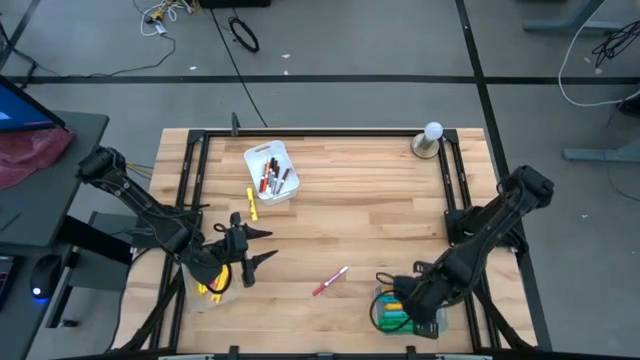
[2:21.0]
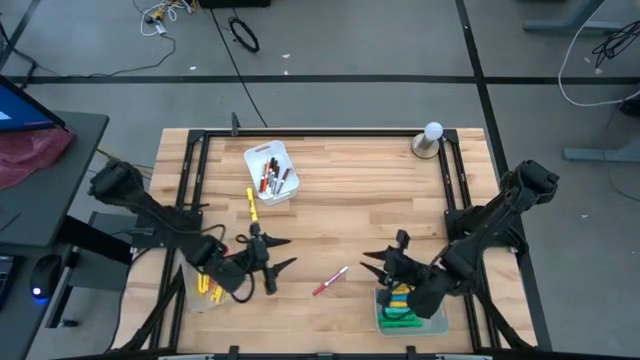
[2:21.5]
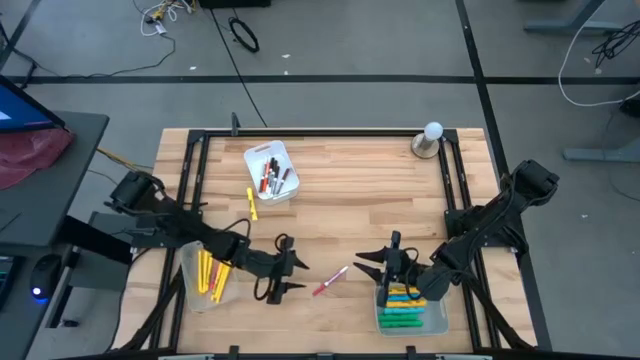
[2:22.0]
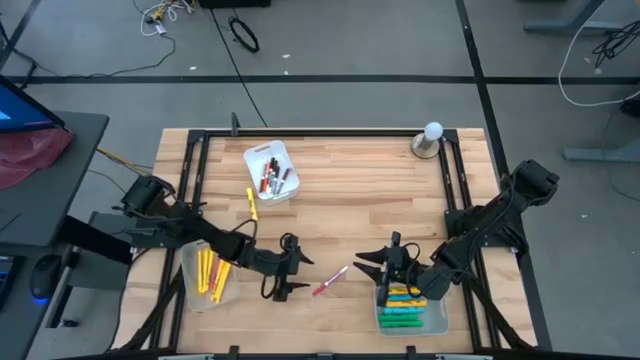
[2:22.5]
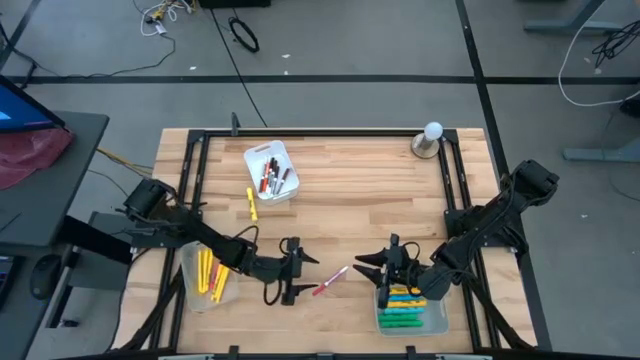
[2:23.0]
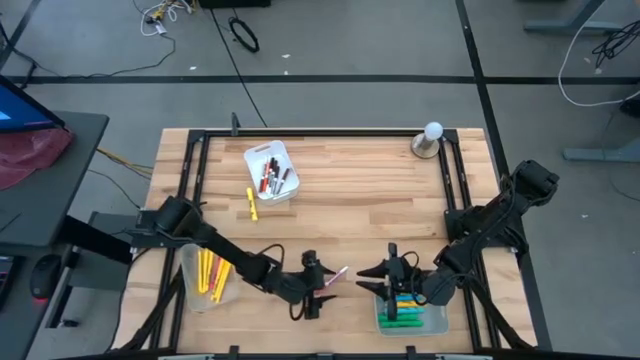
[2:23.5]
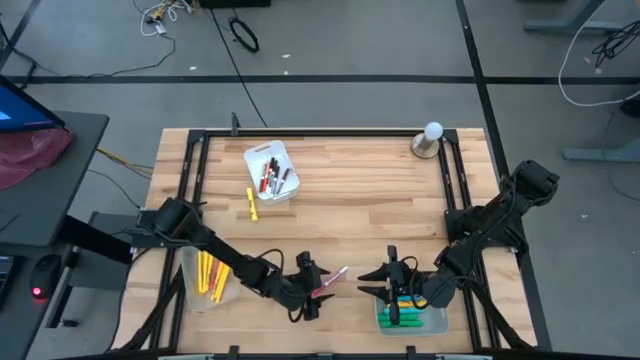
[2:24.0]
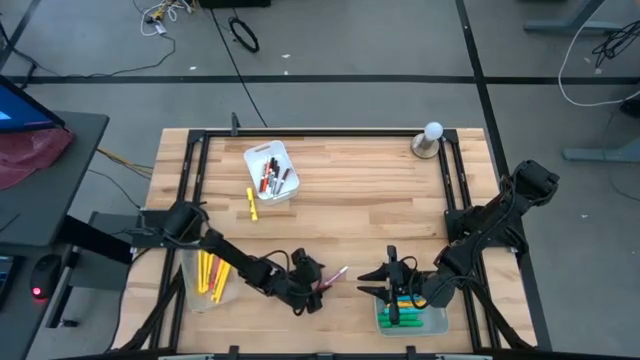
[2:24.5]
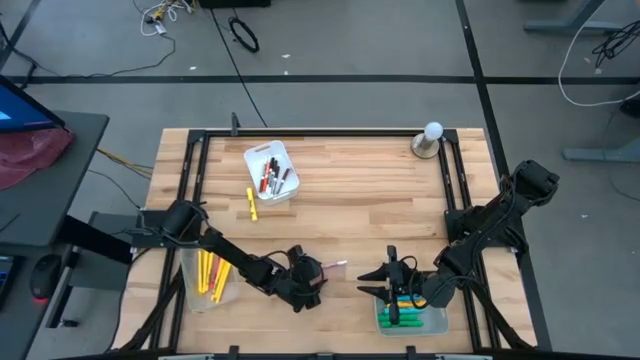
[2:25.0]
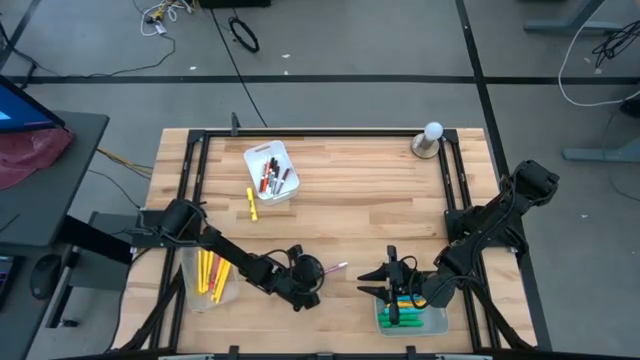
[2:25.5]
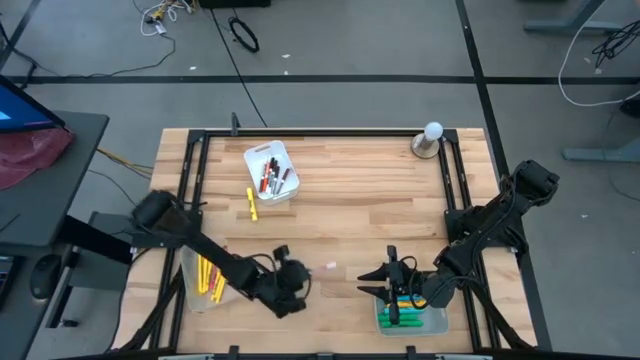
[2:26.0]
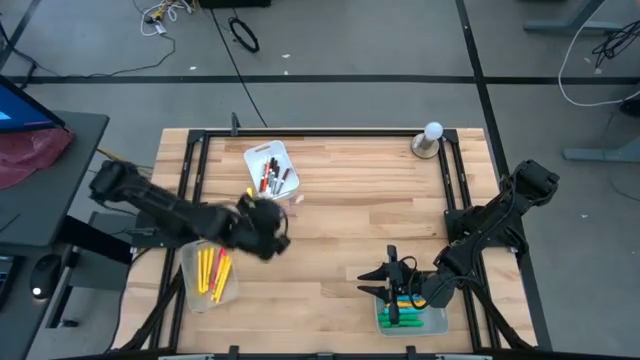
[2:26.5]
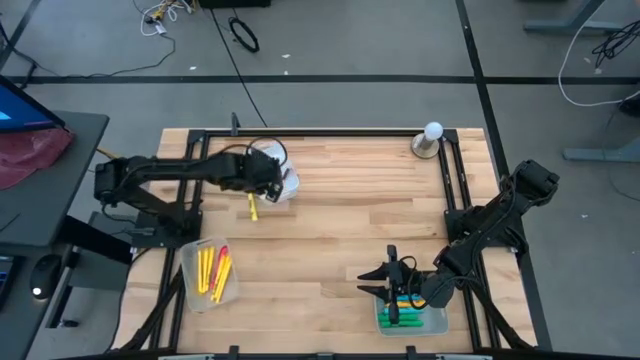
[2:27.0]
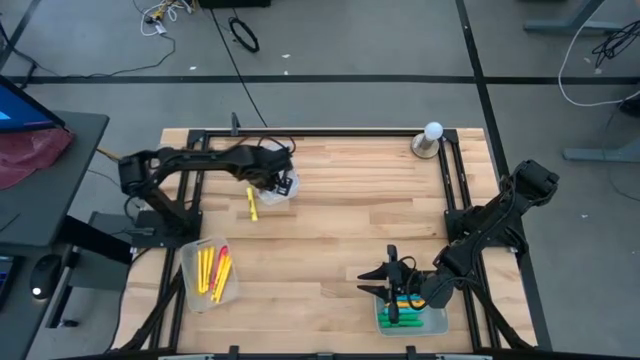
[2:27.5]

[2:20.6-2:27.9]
Task: Pick & Place Markers
Put the pink marker pen into the white bin

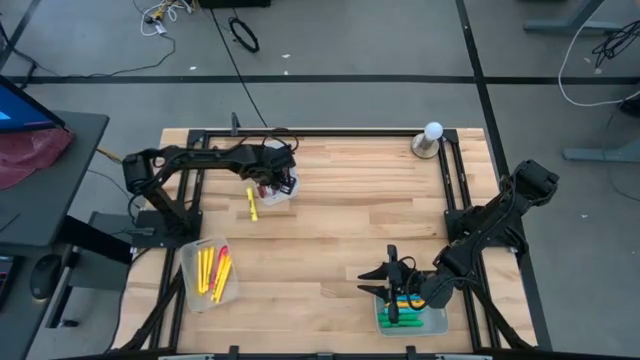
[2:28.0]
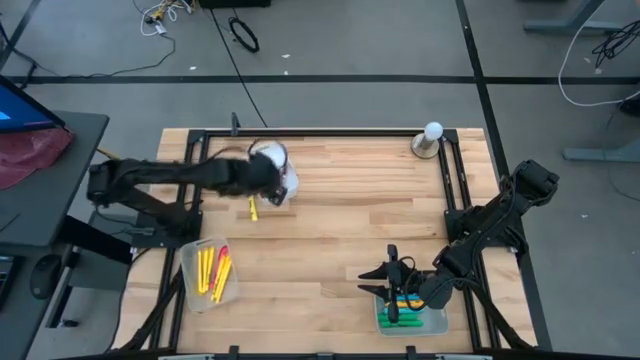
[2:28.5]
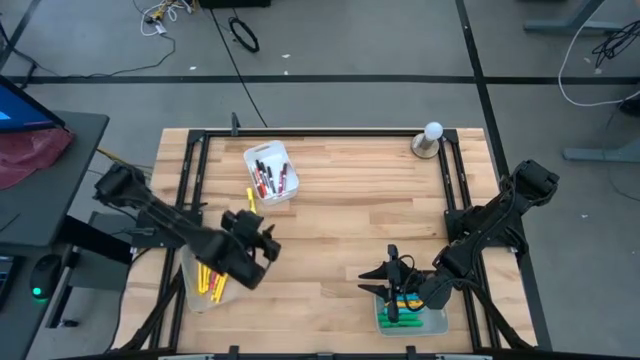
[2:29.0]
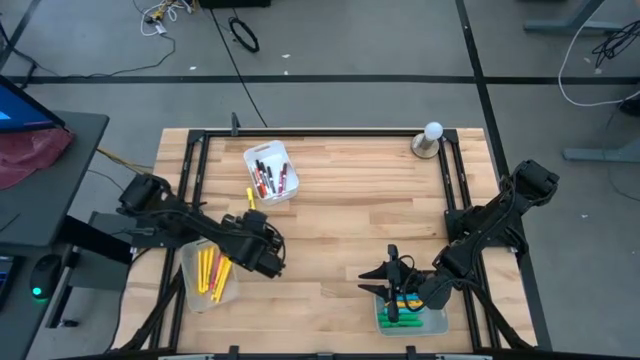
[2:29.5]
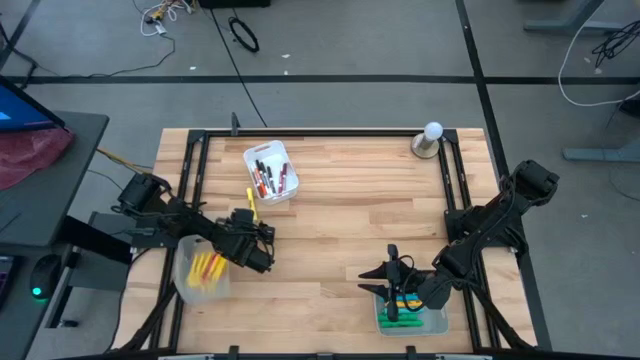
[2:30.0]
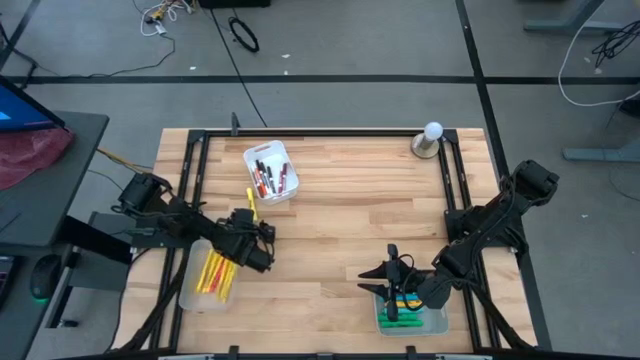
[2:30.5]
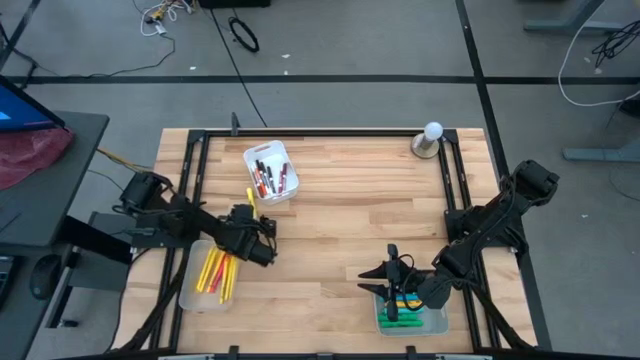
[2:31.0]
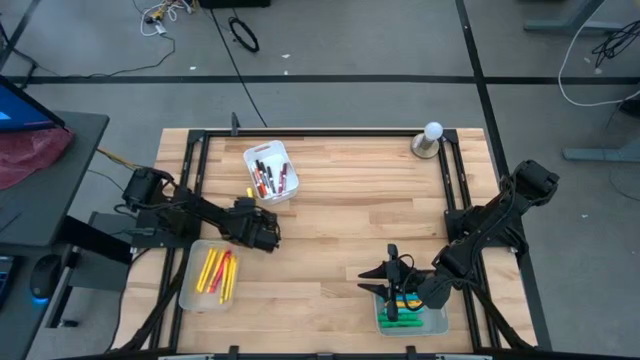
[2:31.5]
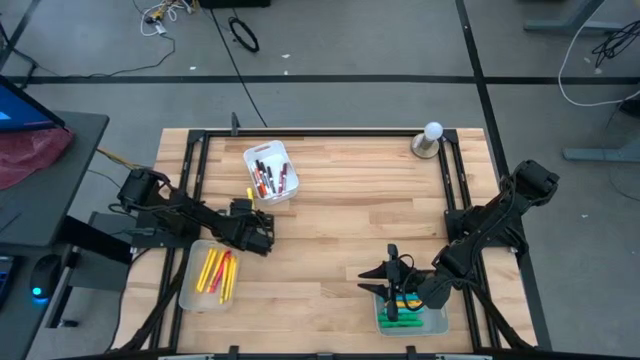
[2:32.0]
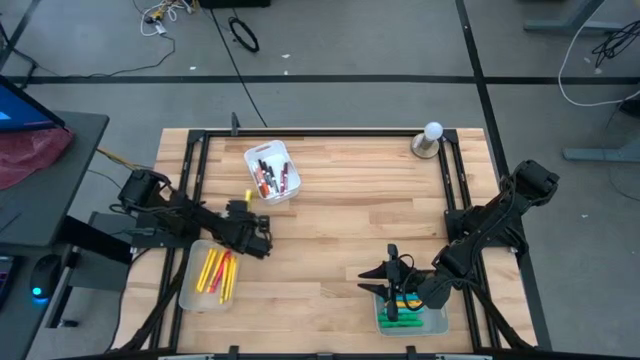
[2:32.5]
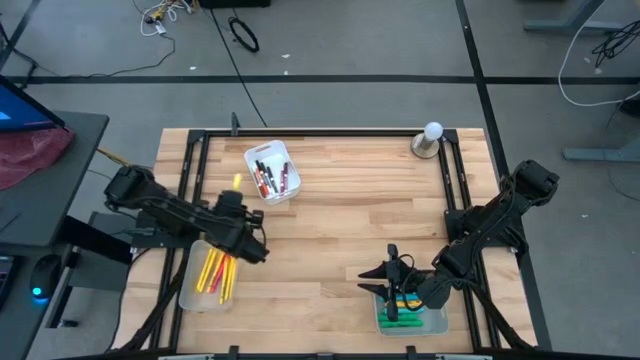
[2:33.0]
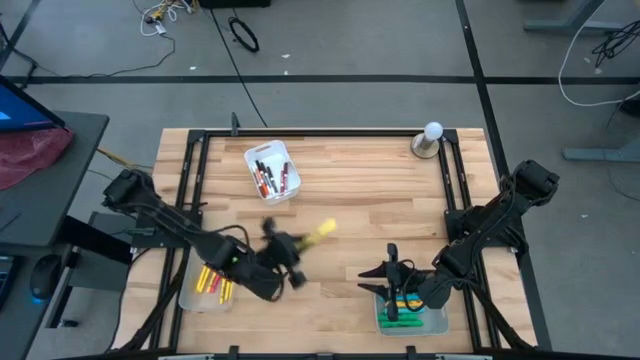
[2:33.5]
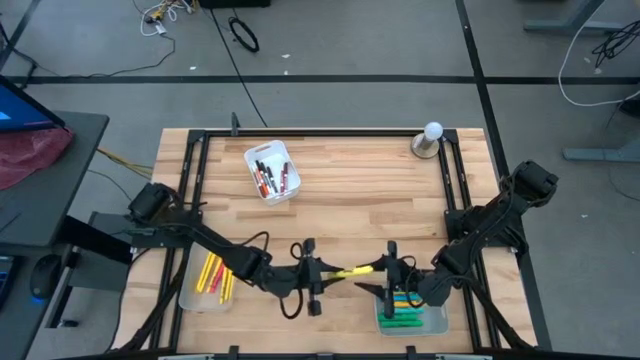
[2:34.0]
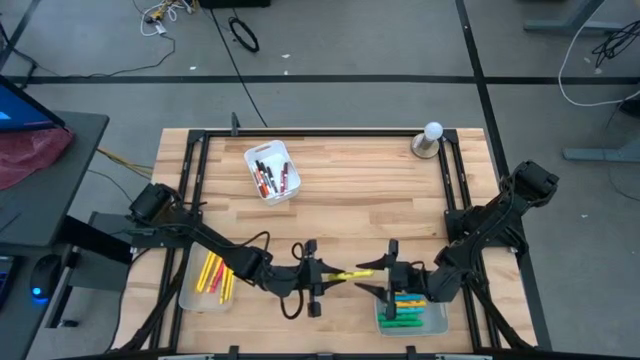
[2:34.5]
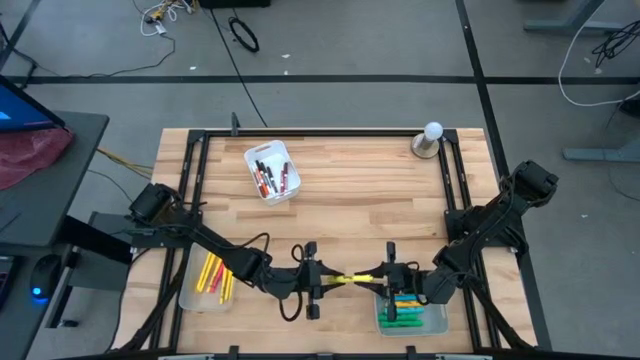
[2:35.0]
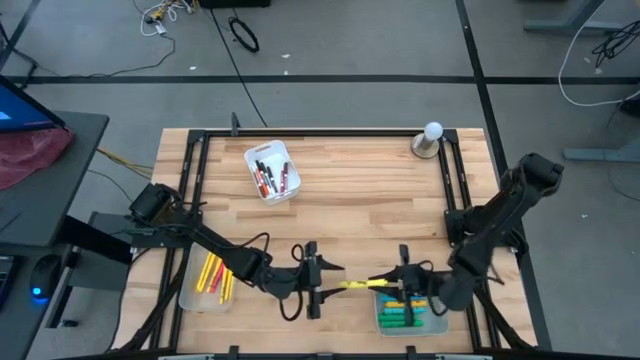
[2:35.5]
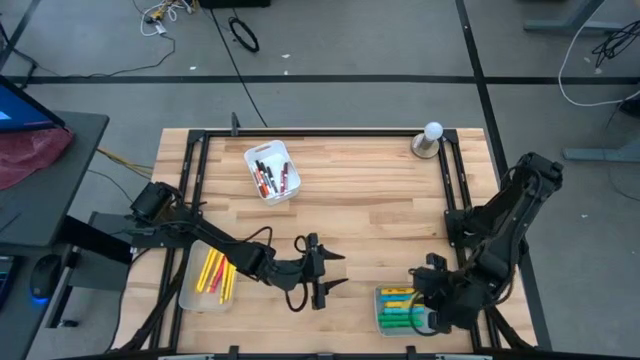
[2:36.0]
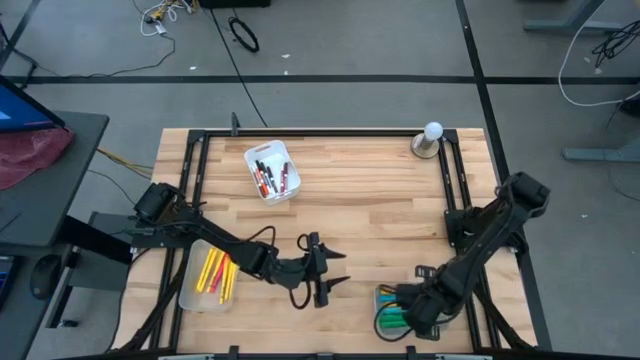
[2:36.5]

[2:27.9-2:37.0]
Put the yellow highlighter into the gray bin

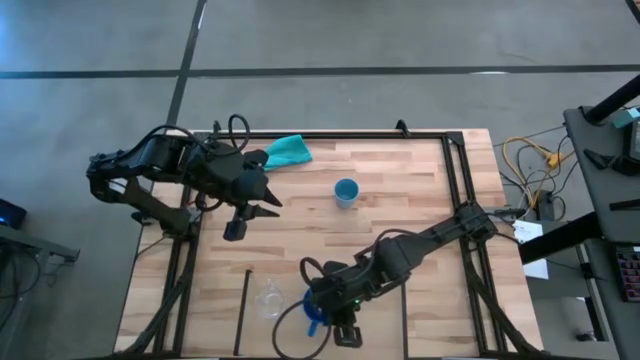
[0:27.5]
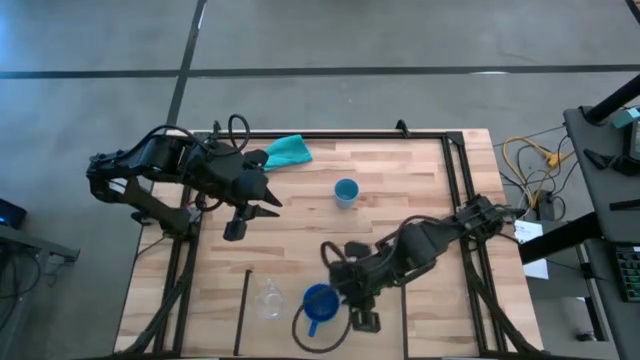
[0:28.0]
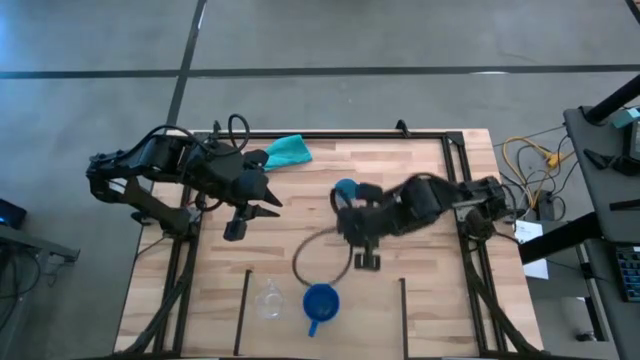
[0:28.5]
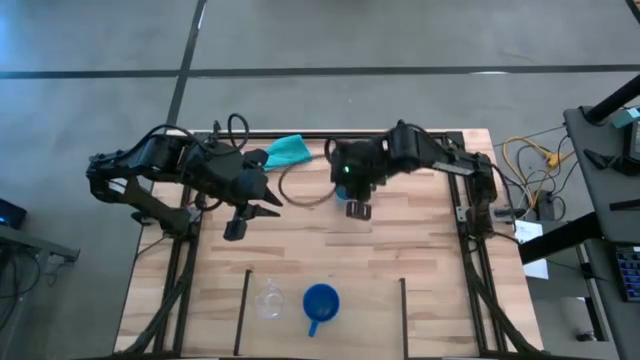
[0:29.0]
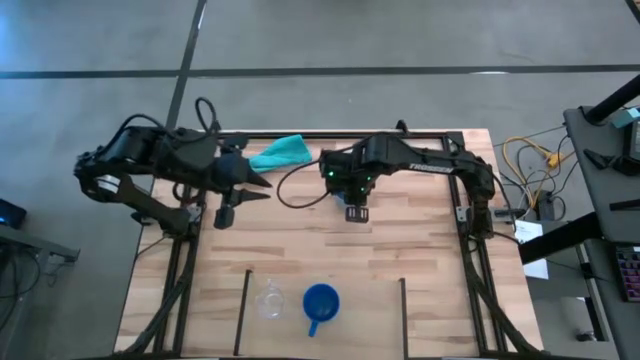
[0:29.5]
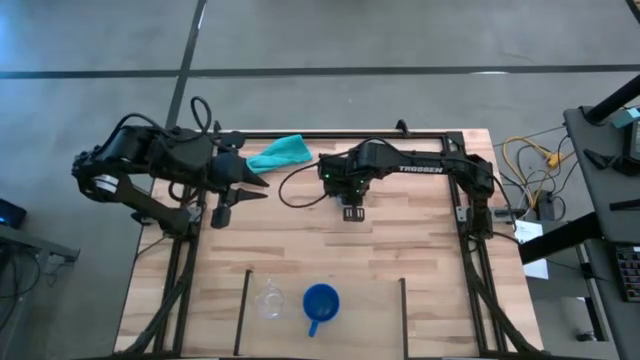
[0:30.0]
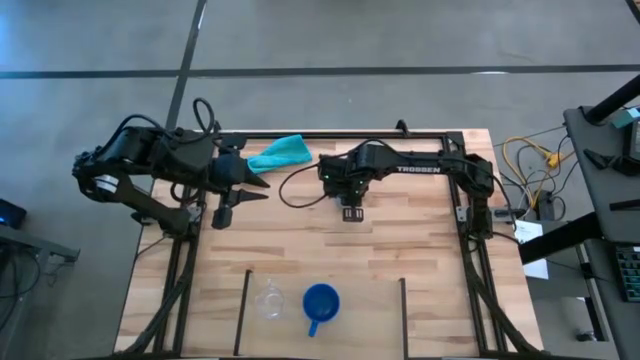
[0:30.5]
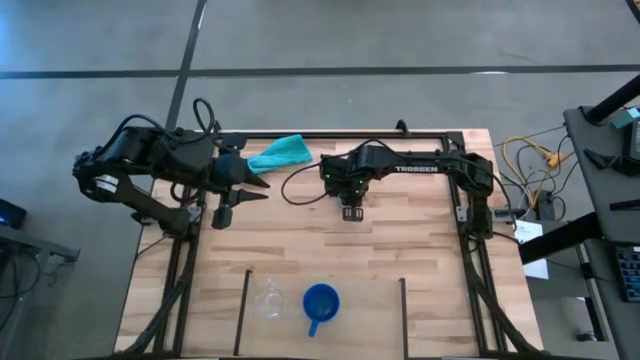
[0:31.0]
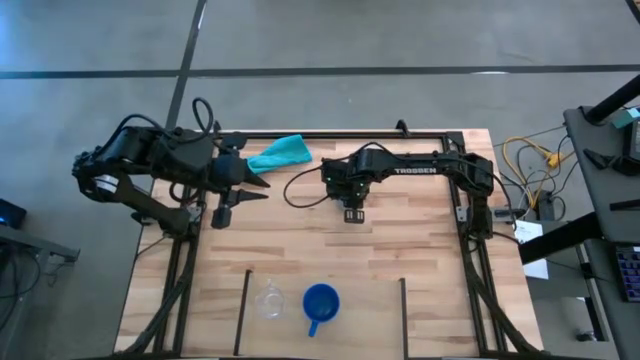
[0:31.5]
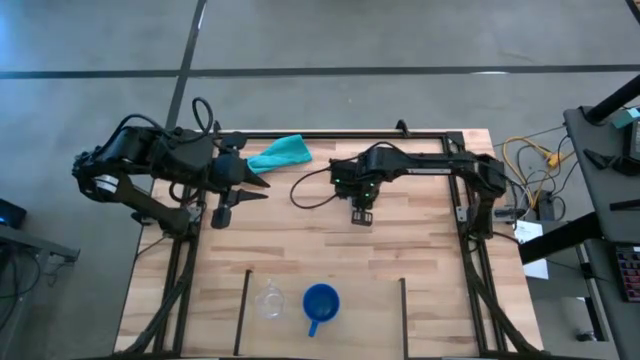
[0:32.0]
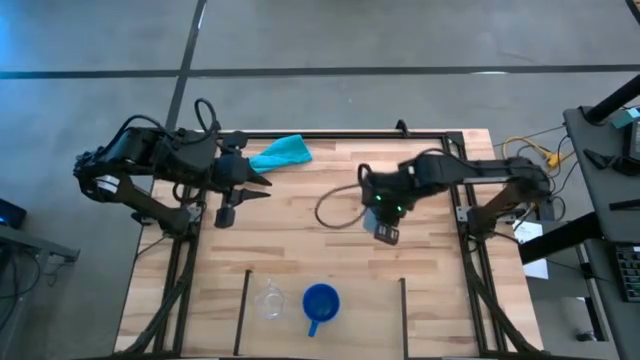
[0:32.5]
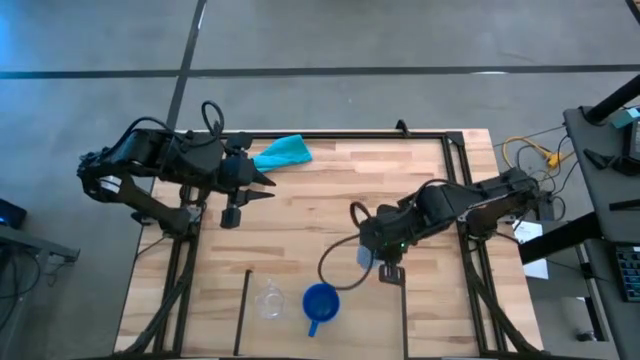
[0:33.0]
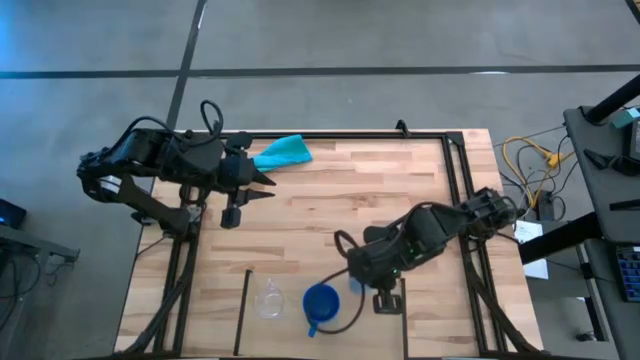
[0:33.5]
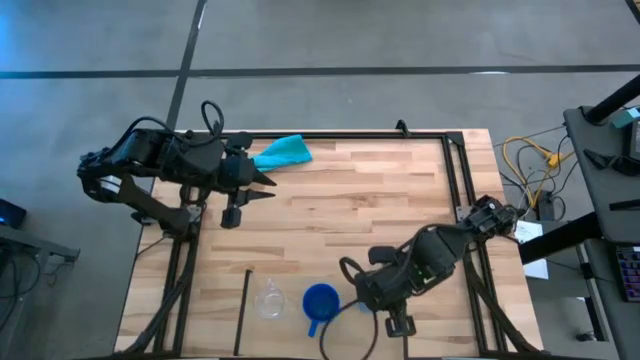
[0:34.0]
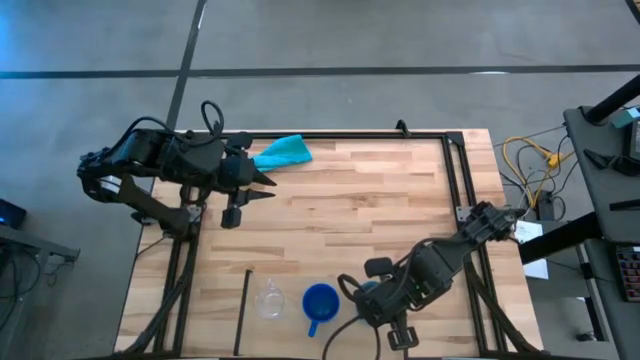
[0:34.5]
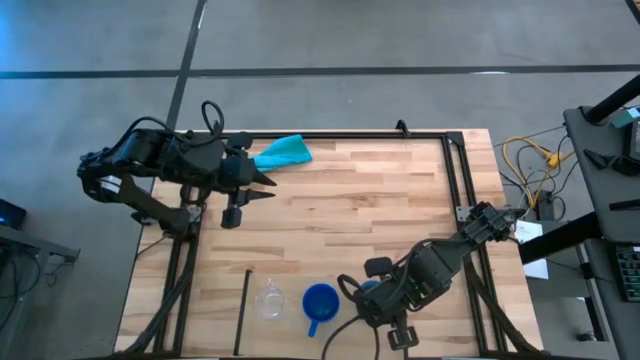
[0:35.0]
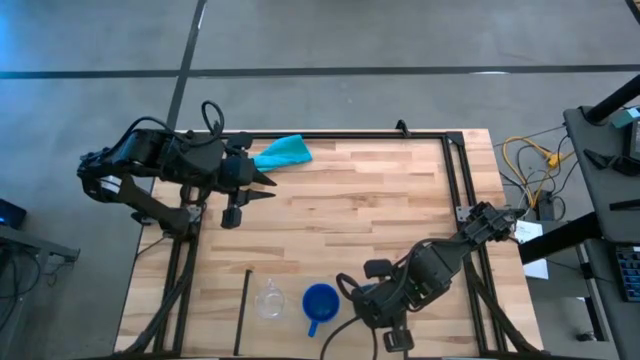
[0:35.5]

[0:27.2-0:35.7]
Task: Stack small to large cups/mugs on shelf
Put the blue cup on the shelf
